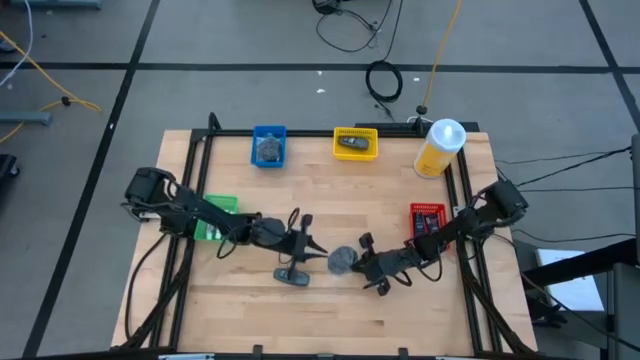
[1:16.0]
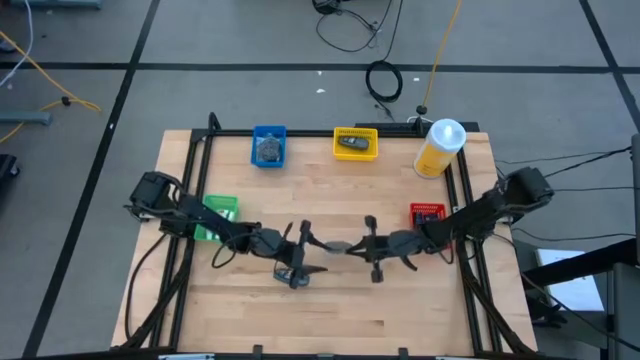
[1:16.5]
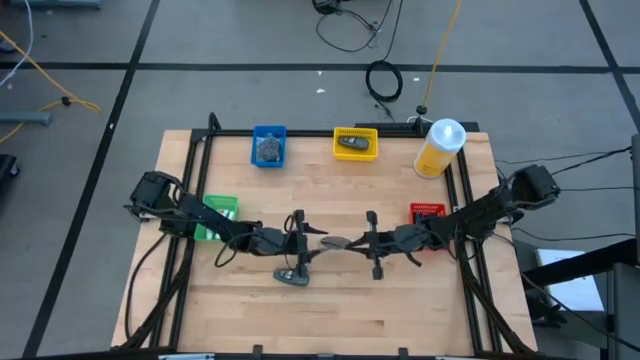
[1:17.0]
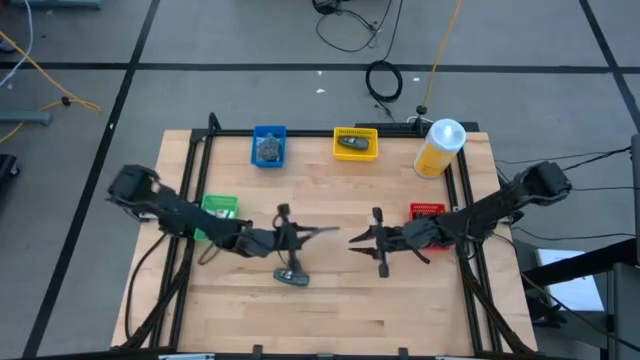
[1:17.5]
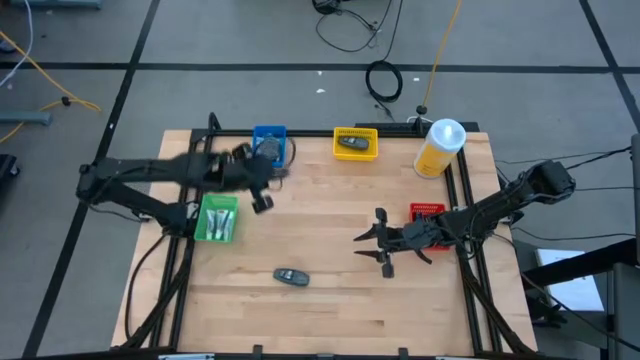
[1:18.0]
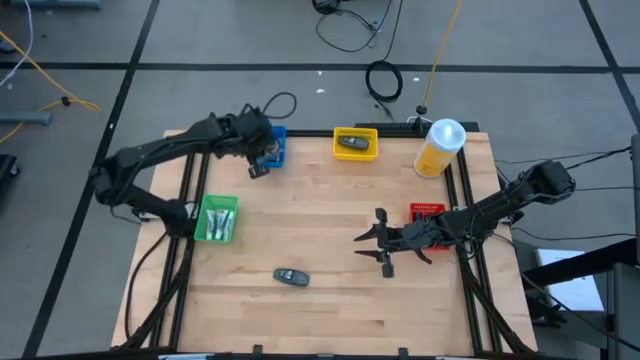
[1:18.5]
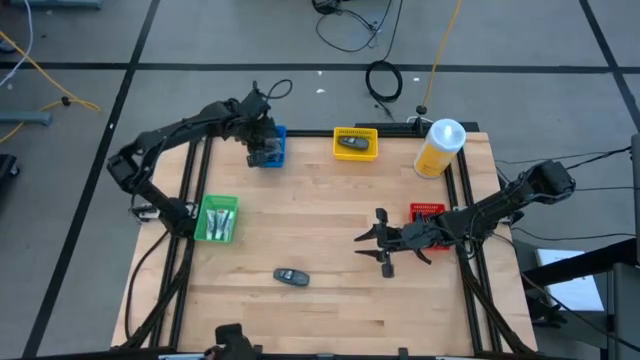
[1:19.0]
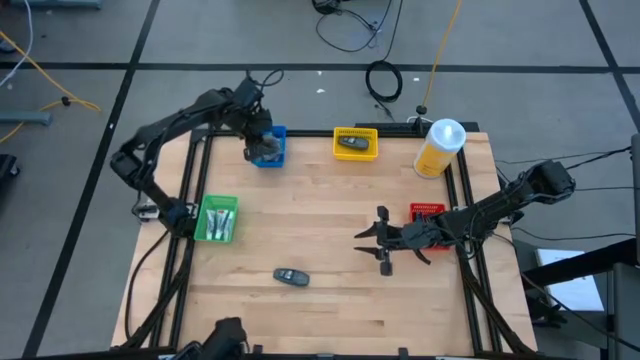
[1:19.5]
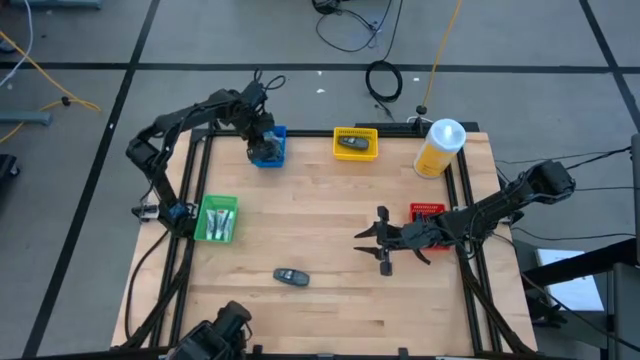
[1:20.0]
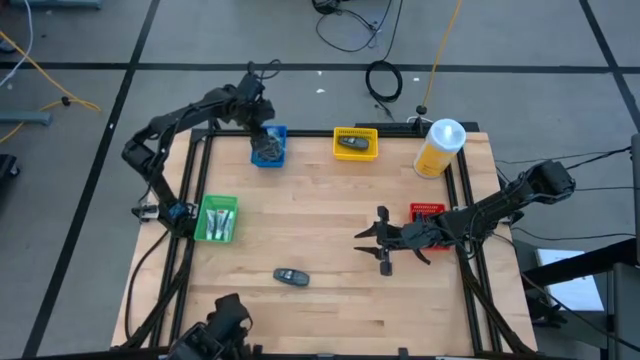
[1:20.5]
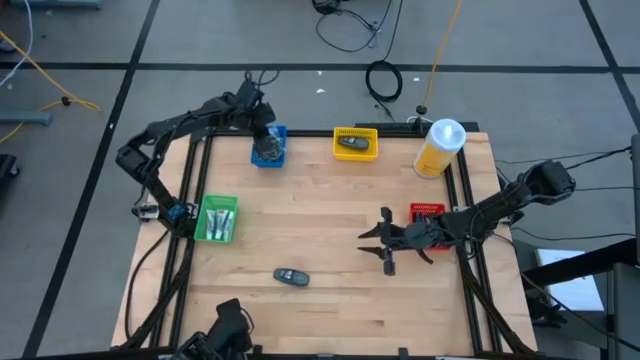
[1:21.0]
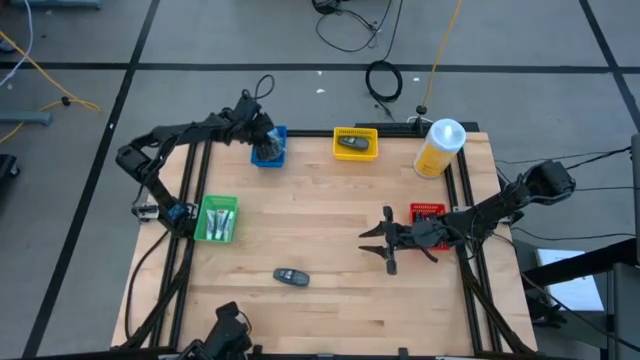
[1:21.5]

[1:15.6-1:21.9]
Task: Pick & Place Travel size toiletries
Put the black hairbrush into the blue bin

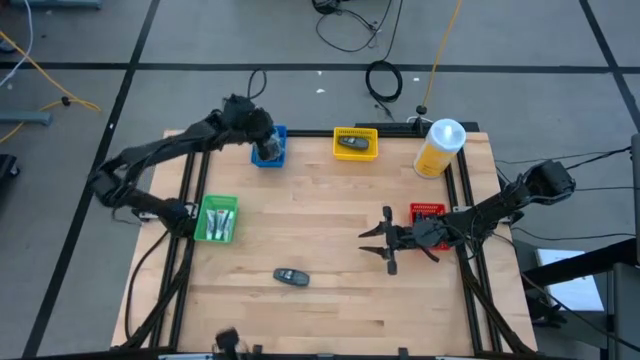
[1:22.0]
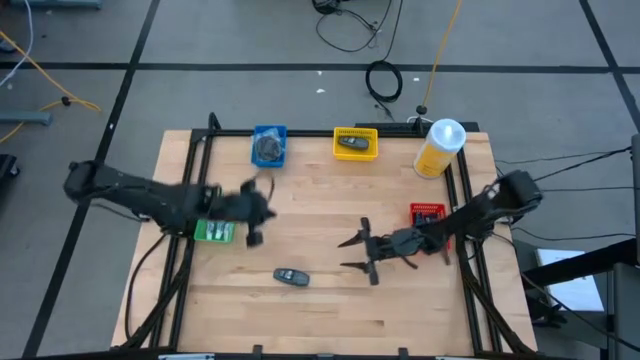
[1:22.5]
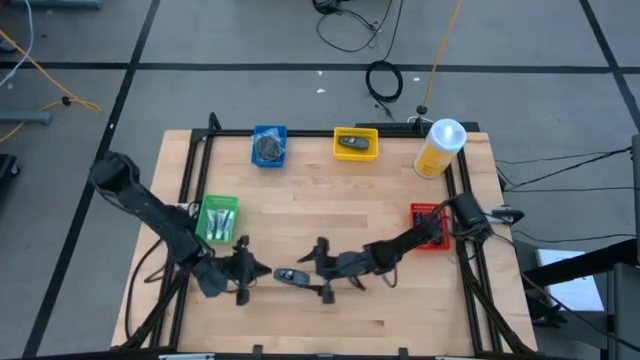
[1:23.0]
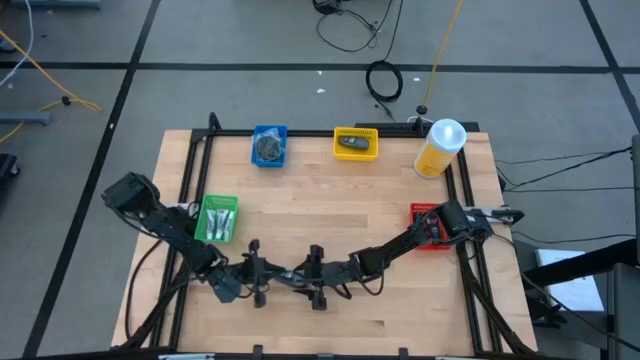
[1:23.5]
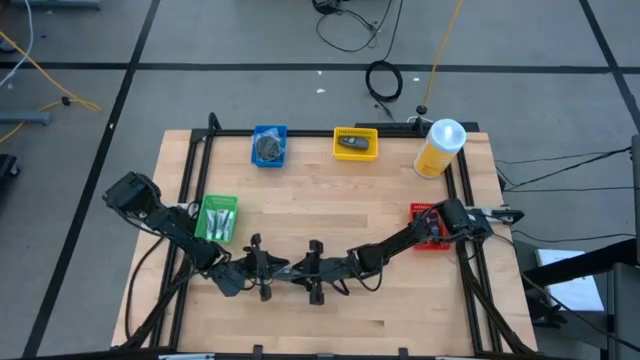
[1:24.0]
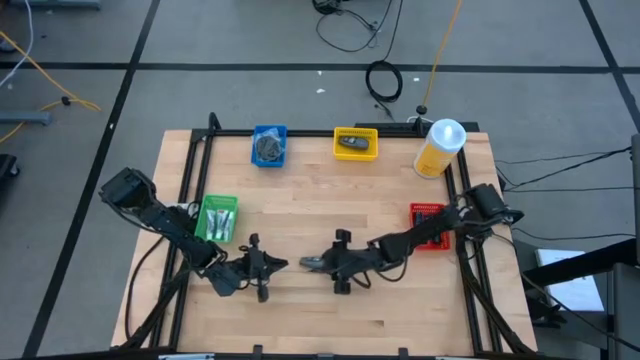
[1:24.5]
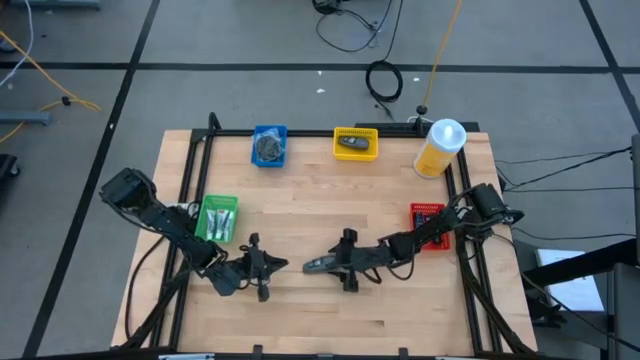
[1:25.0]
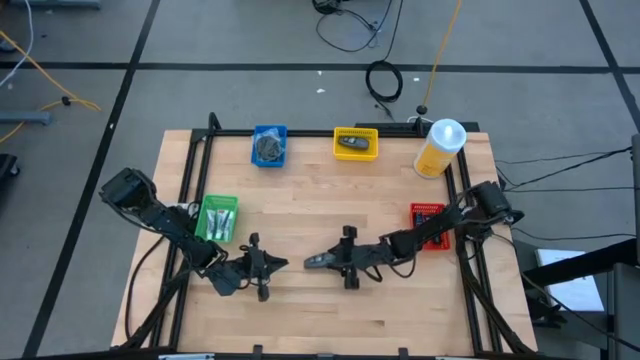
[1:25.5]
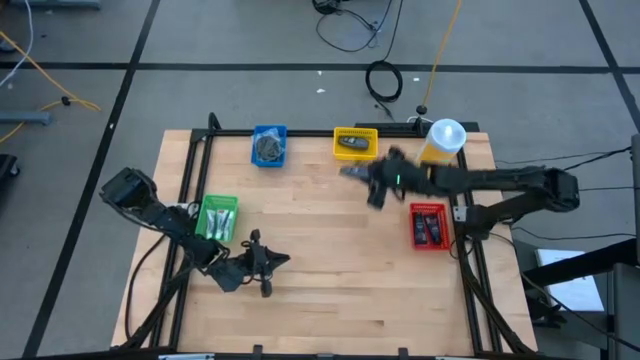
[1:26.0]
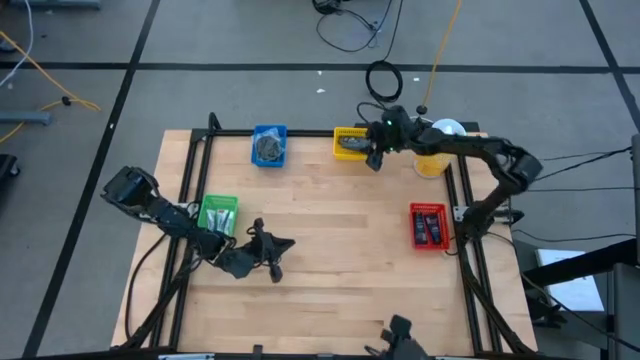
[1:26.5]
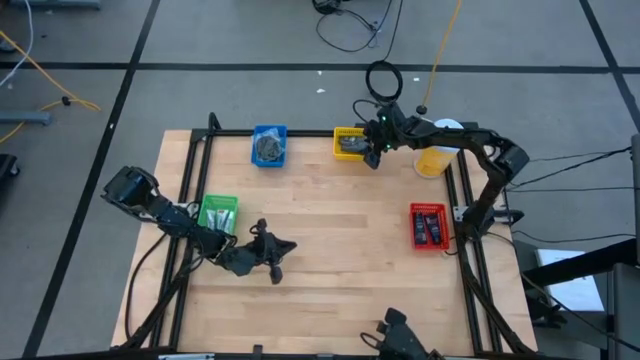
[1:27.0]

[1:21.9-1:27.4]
Put the gray deodorant into the yellow bin

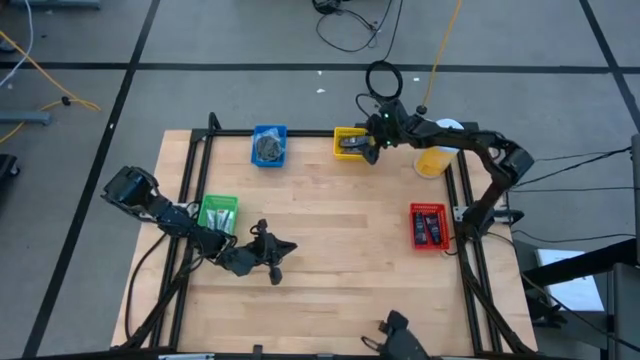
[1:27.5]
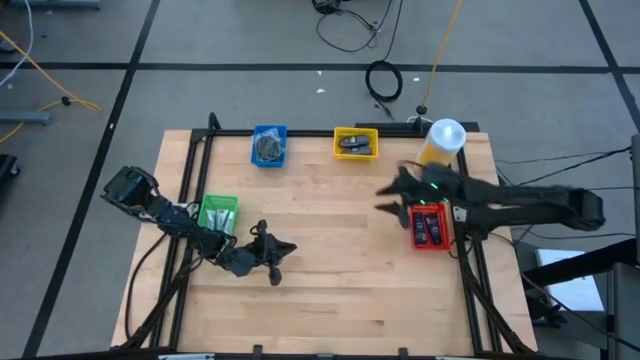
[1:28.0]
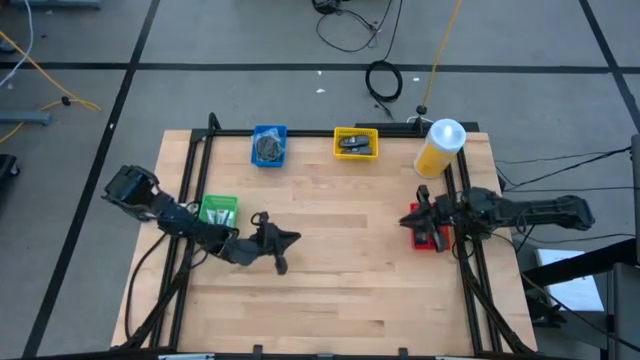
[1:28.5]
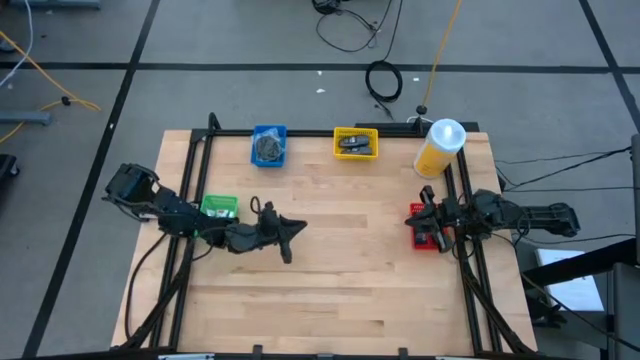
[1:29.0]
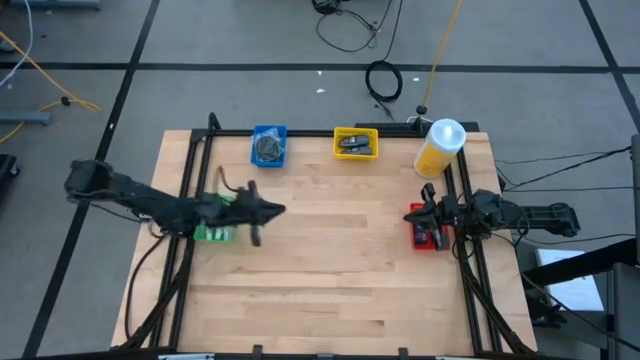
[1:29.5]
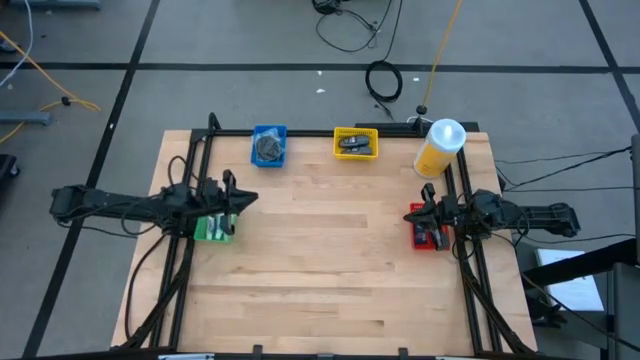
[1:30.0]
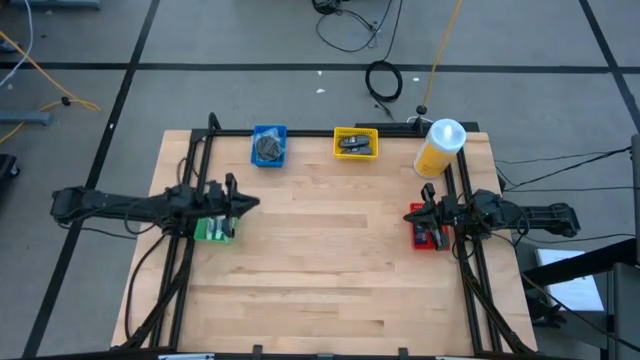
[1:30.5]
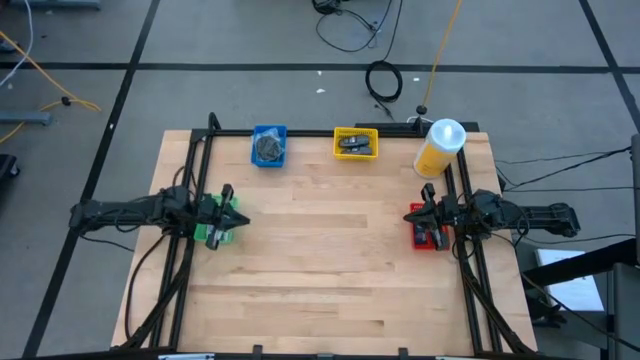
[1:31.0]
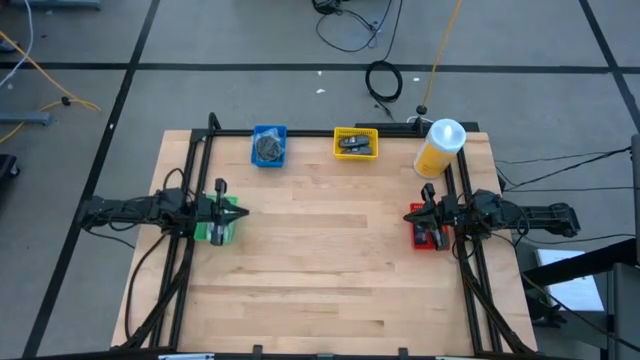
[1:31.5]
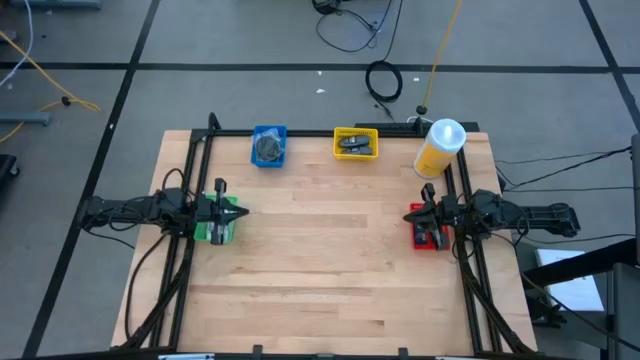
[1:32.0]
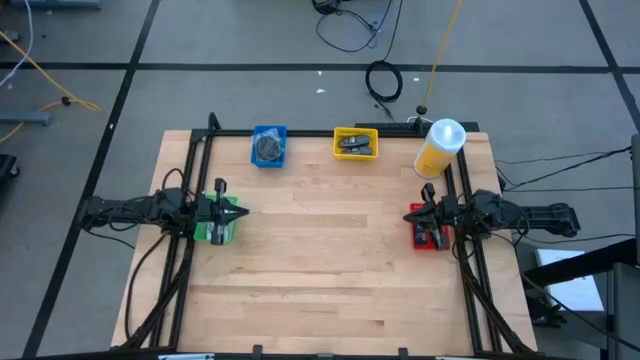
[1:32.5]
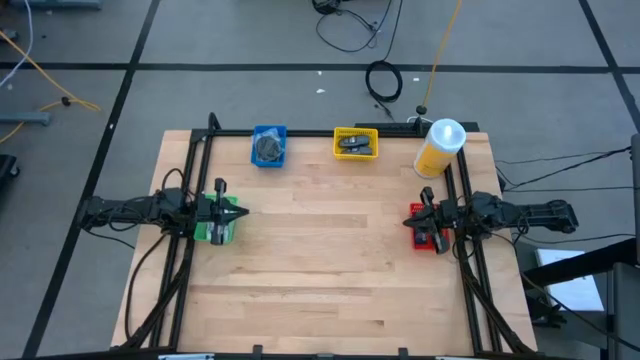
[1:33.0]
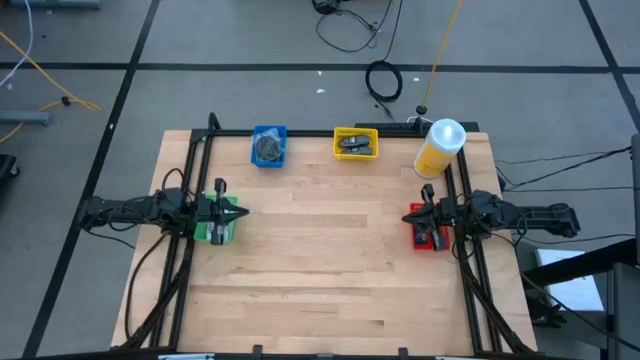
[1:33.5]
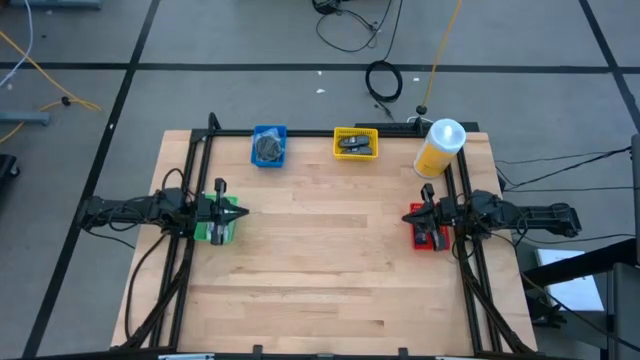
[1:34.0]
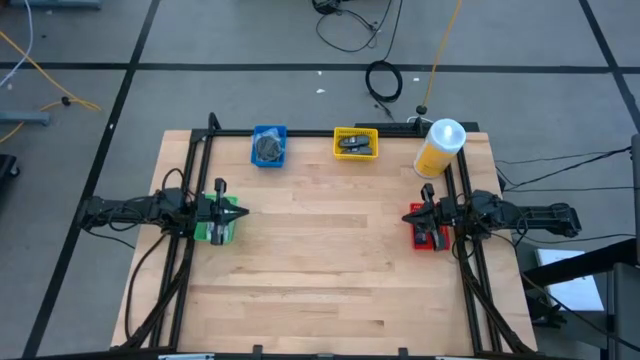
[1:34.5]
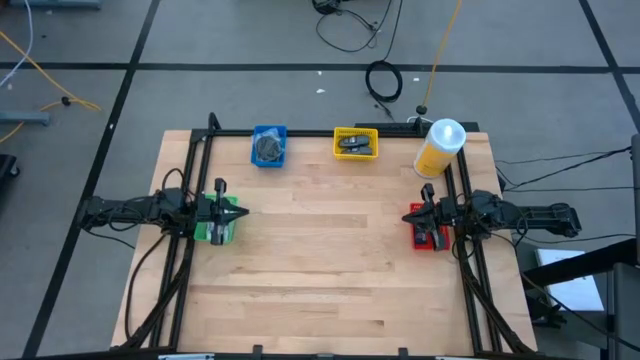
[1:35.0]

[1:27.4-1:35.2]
Return to Home Position

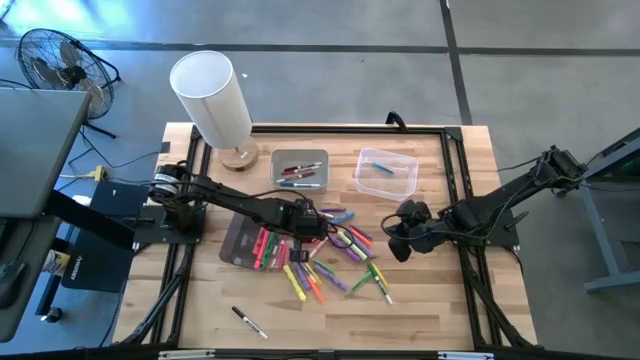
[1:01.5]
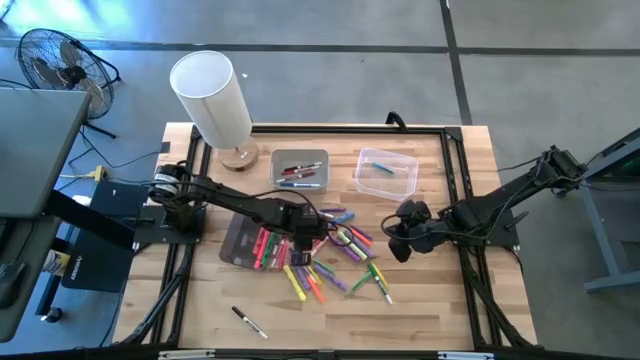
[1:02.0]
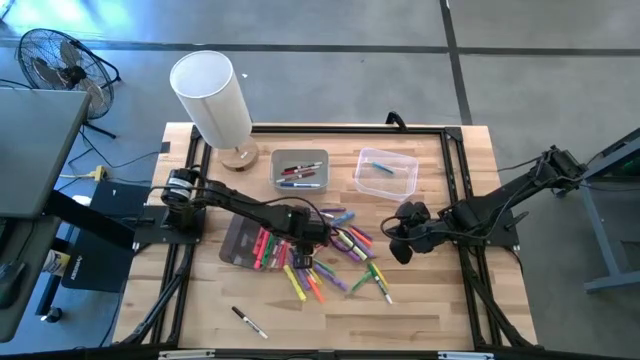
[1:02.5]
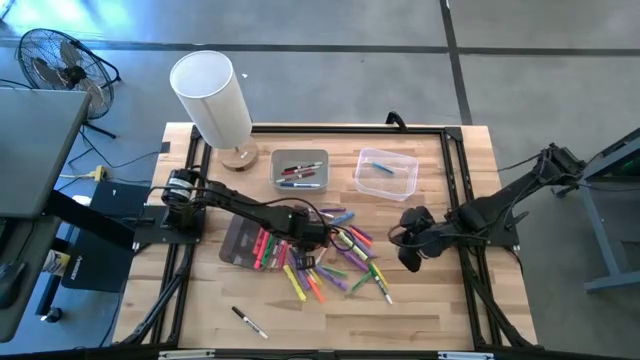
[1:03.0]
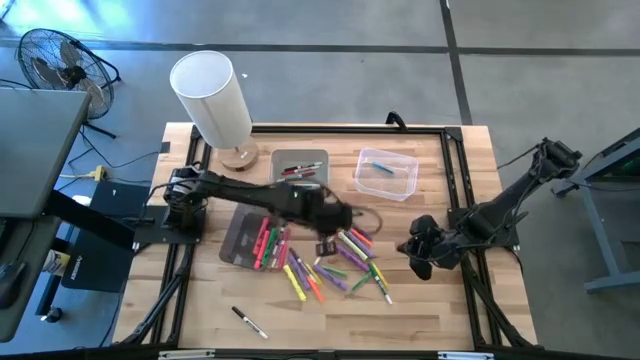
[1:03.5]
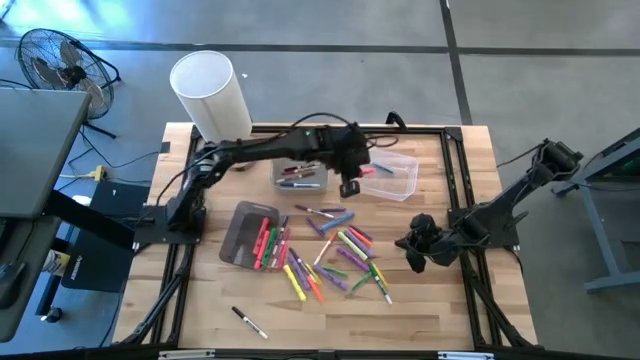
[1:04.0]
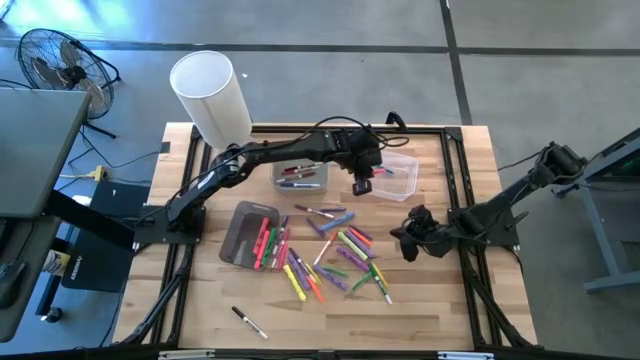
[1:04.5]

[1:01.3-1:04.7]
Task: Pick & Place Markers
Put the pink pen into the transparent bin
